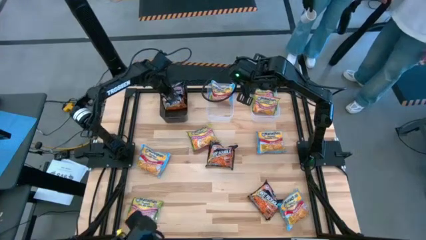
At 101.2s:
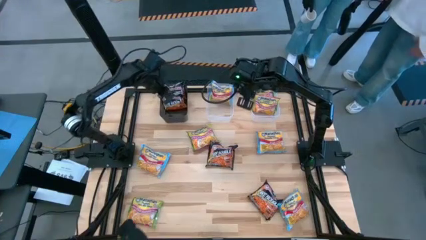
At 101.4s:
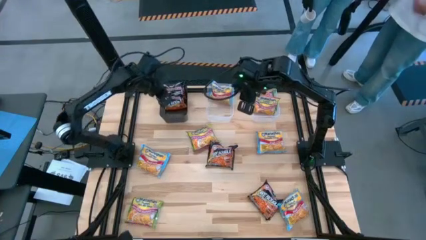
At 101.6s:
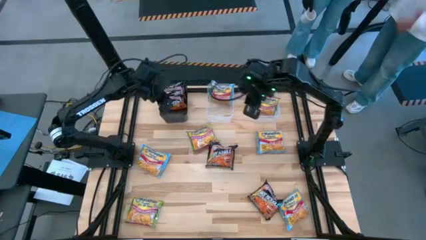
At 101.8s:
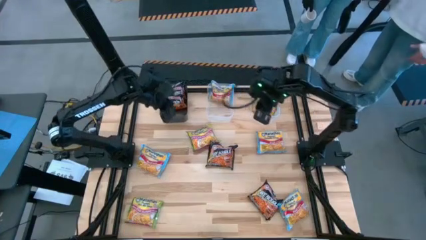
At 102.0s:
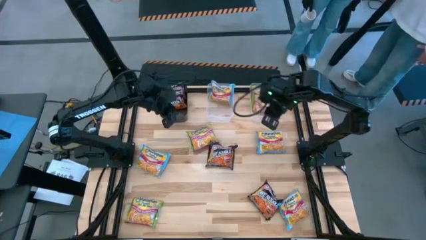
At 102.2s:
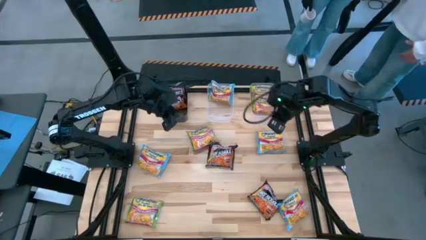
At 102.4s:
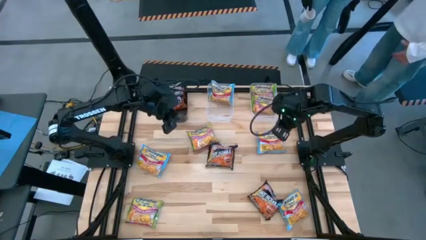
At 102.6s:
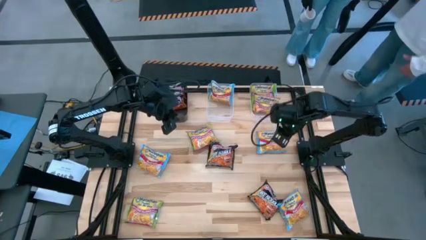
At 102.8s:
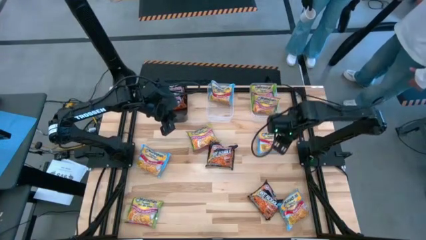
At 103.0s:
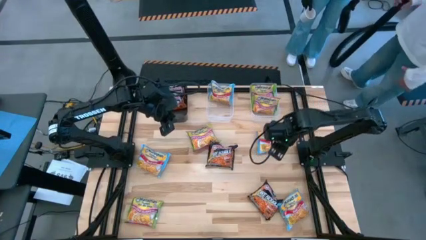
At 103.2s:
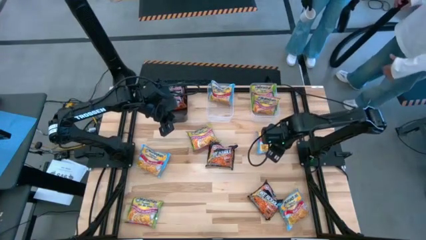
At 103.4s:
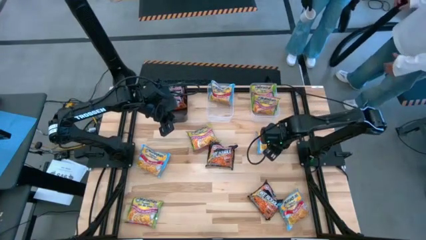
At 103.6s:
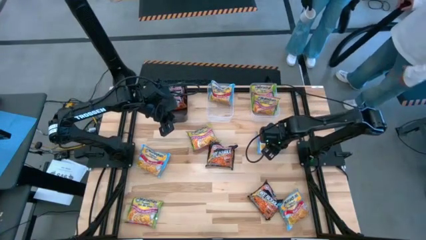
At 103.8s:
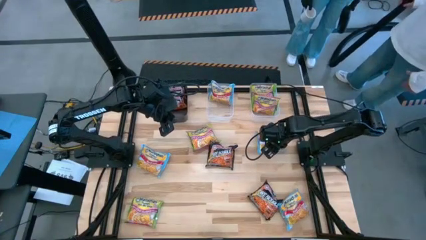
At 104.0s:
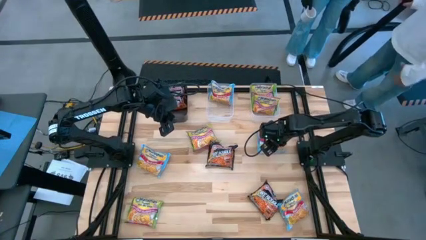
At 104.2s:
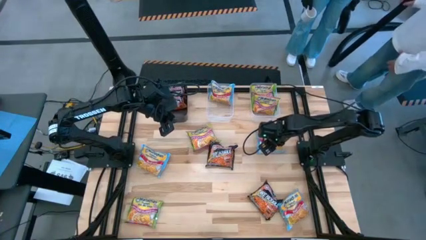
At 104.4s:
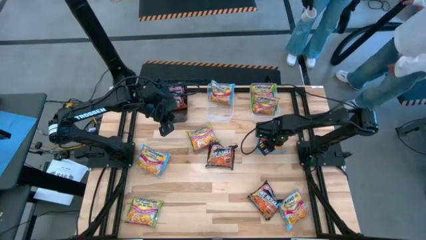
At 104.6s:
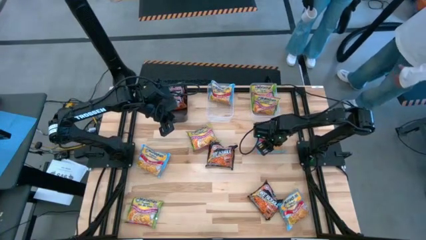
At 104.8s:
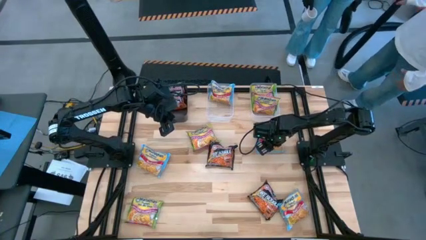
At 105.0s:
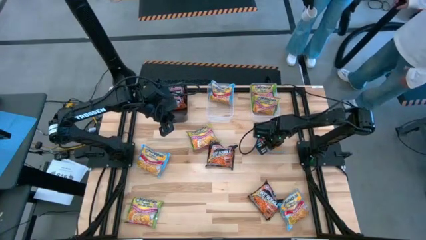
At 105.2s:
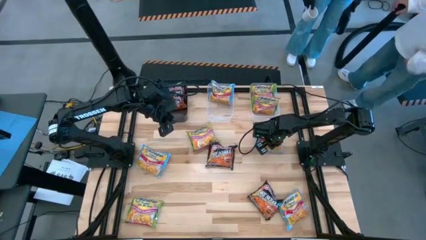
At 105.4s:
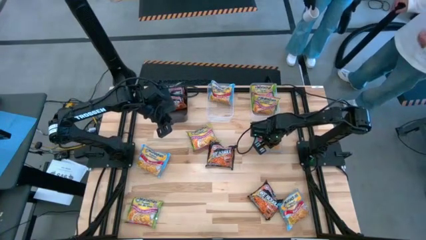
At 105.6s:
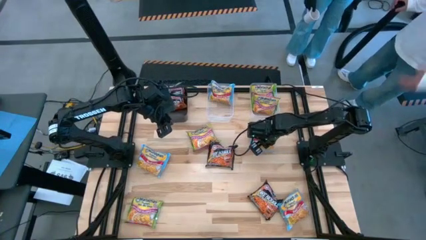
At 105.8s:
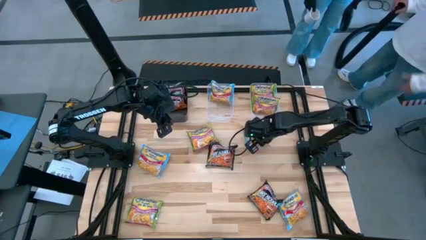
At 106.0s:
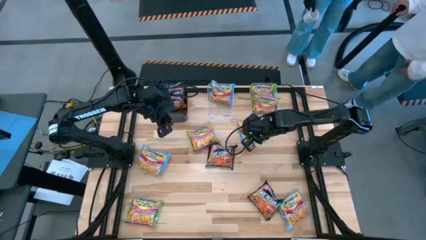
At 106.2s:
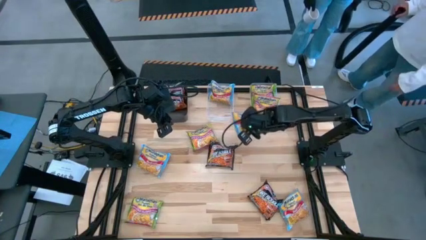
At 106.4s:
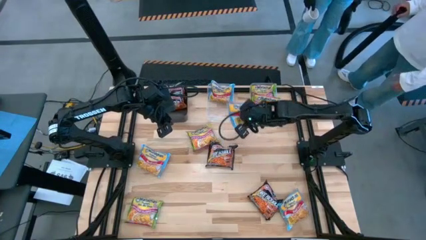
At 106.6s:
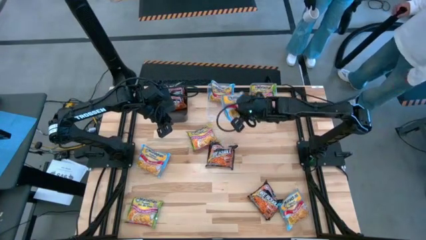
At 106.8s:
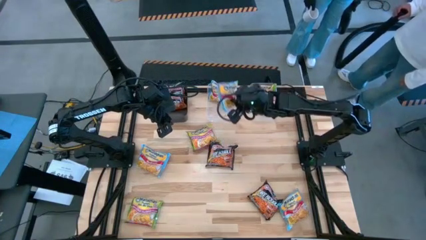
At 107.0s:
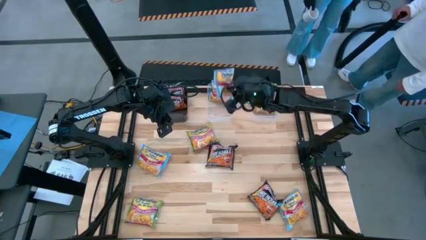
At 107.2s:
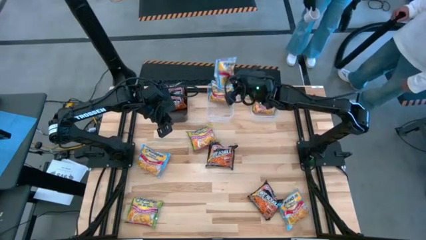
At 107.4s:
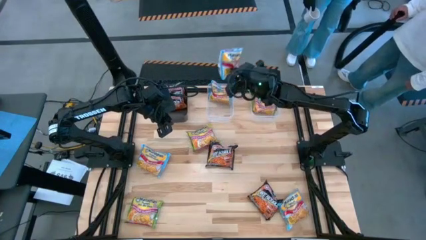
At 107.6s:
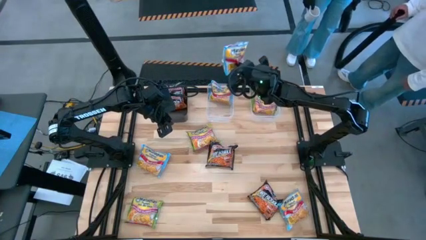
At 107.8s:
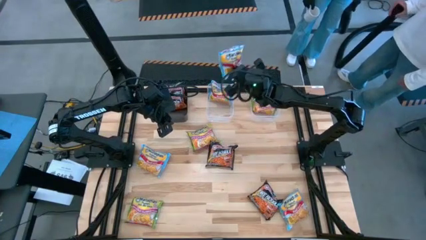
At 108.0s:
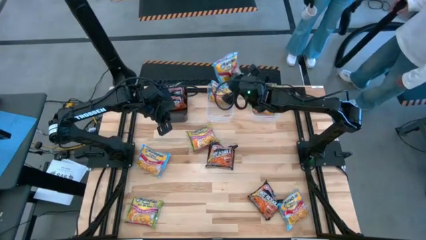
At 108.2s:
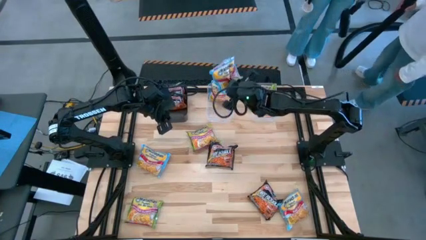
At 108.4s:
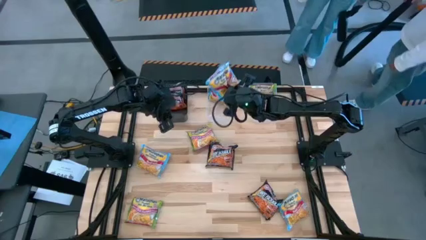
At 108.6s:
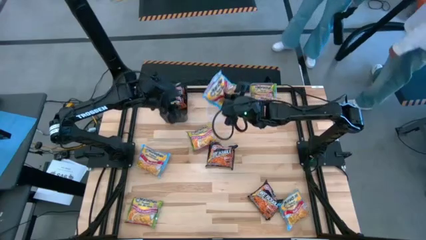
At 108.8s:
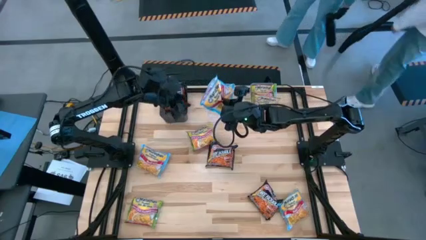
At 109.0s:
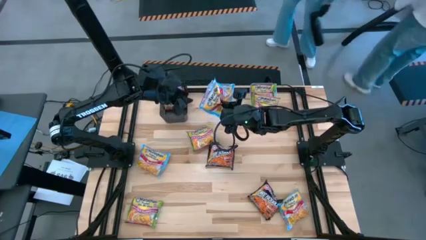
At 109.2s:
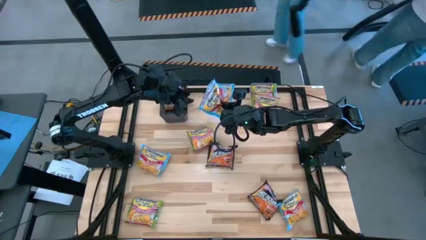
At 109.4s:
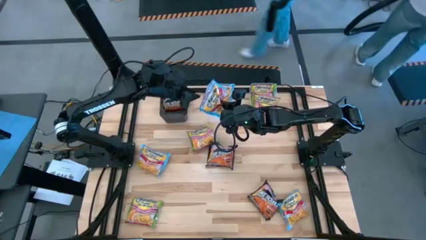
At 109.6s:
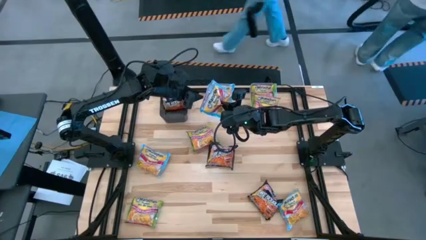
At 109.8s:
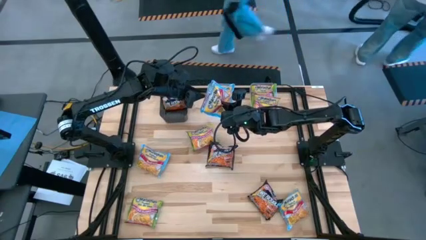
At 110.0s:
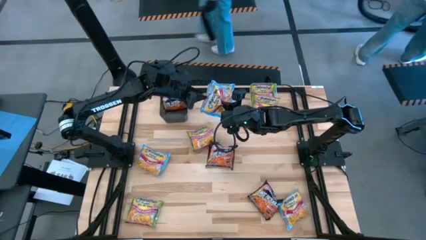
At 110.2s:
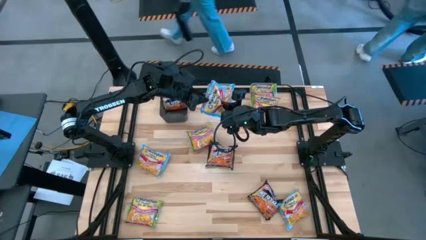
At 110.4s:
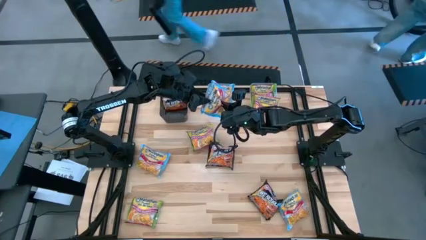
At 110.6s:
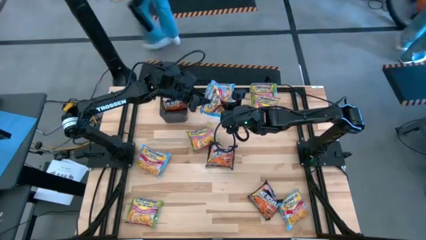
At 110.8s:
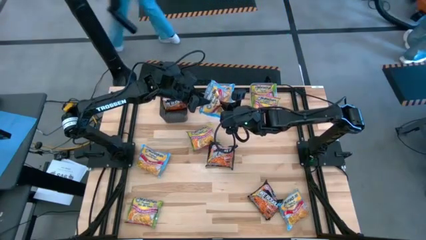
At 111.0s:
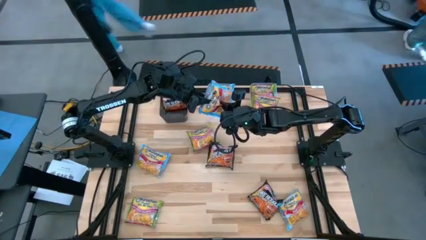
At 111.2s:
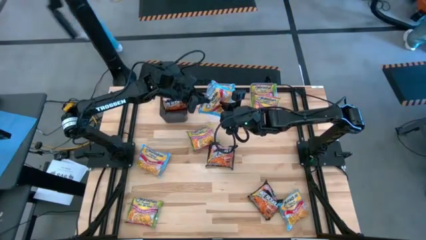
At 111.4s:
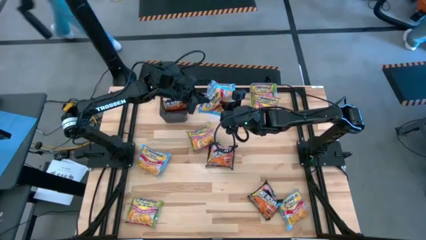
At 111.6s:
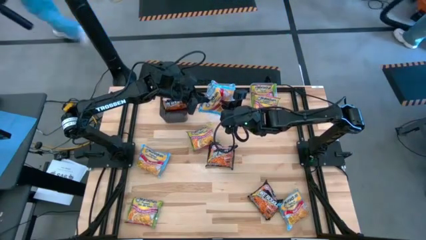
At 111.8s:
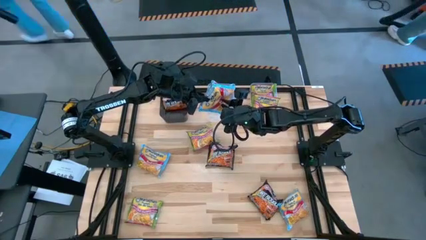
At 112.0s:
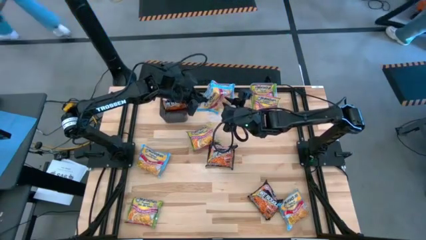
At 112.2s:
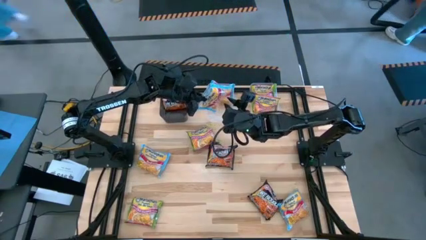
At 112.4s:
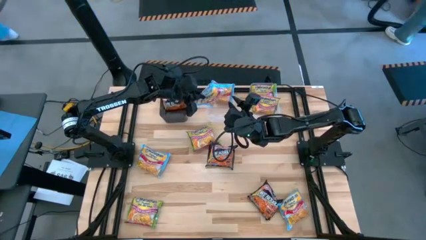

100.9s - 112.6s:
Task: Sort Maruchan noodles
Put the top right blue noodle pack into the left transparent bin

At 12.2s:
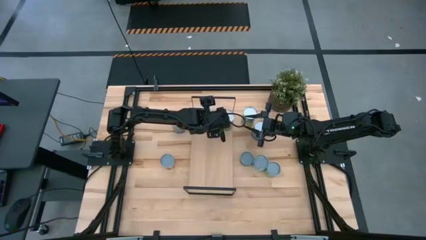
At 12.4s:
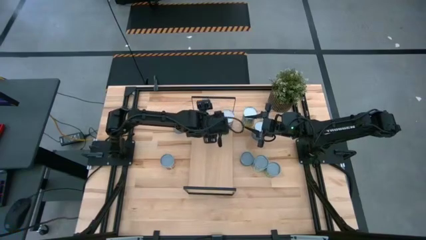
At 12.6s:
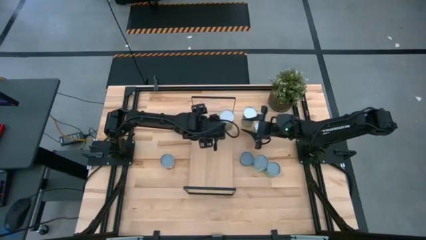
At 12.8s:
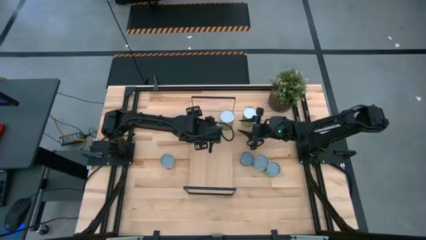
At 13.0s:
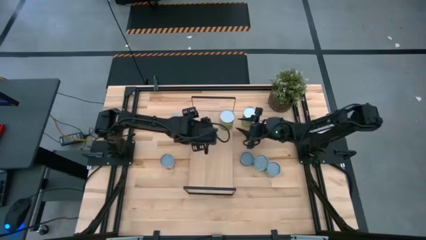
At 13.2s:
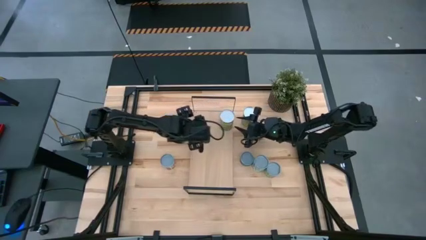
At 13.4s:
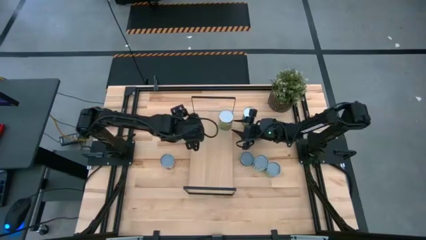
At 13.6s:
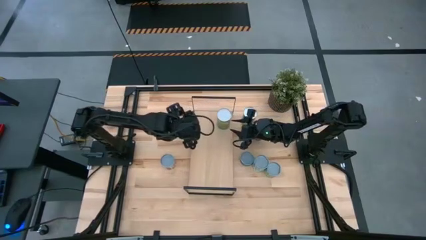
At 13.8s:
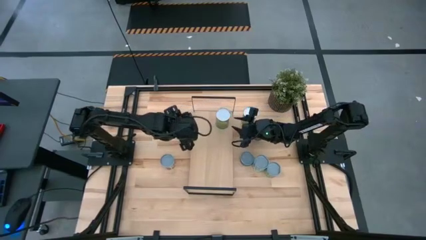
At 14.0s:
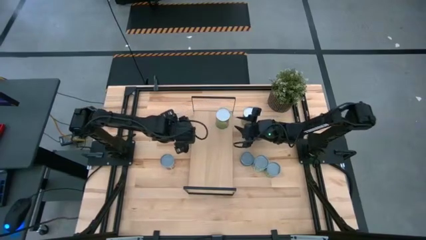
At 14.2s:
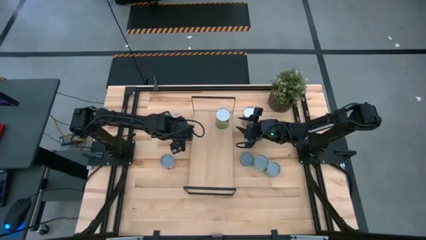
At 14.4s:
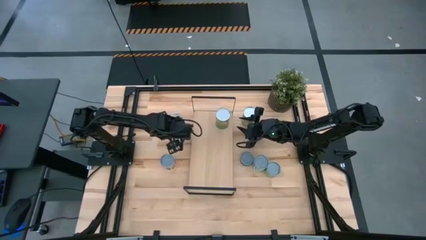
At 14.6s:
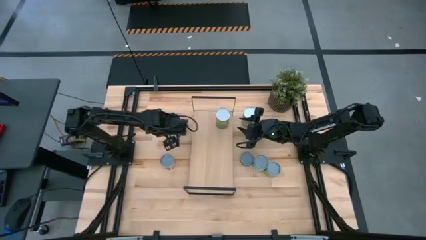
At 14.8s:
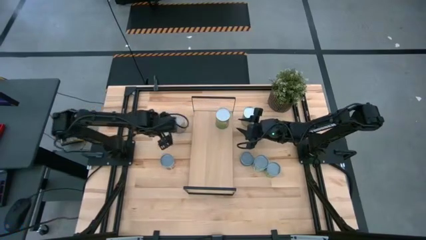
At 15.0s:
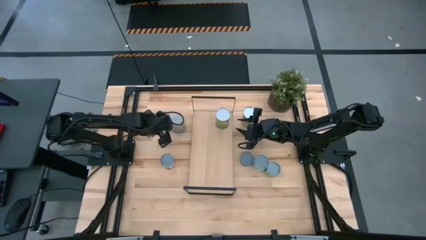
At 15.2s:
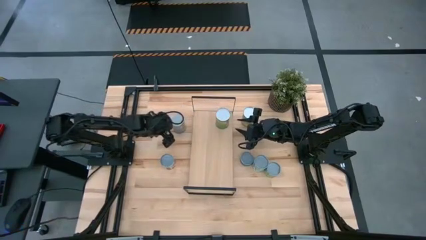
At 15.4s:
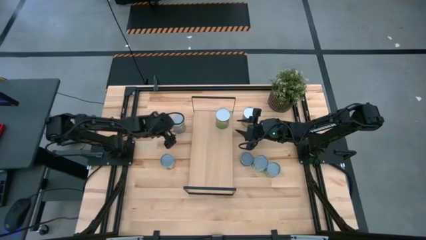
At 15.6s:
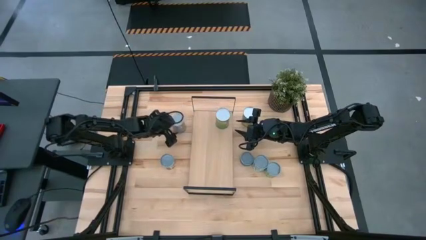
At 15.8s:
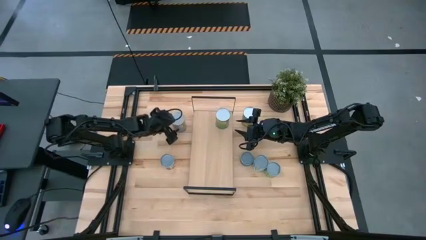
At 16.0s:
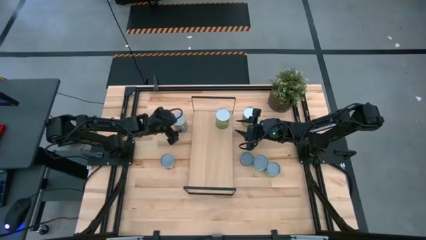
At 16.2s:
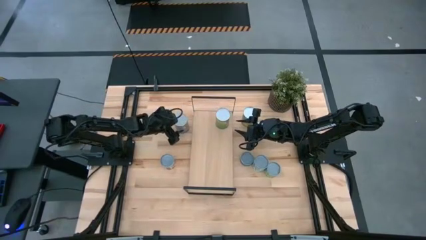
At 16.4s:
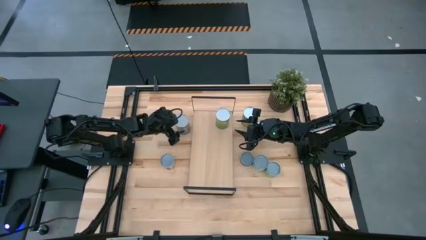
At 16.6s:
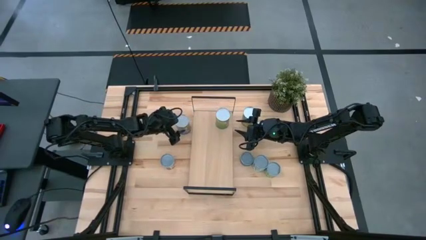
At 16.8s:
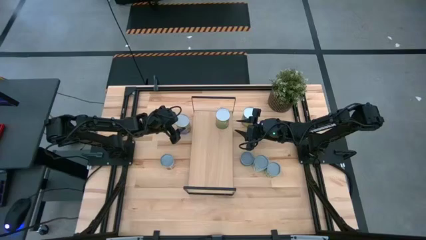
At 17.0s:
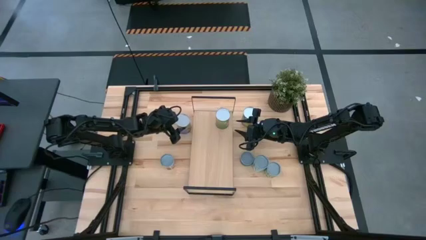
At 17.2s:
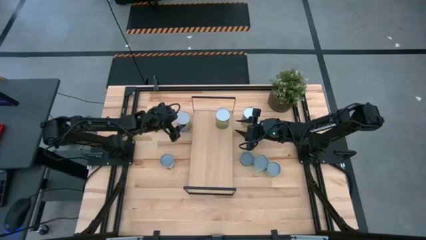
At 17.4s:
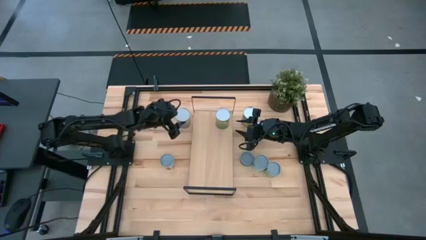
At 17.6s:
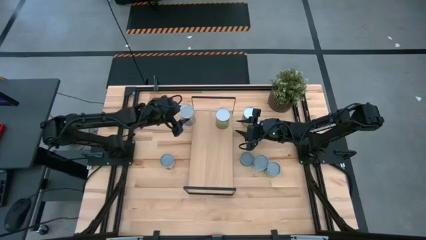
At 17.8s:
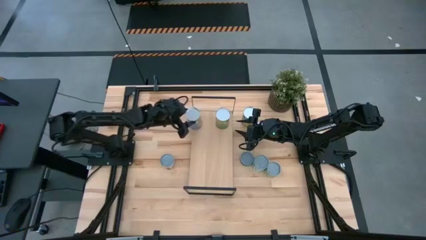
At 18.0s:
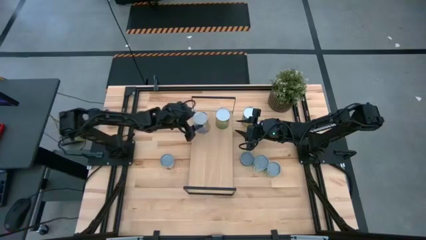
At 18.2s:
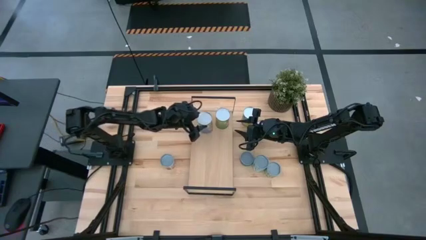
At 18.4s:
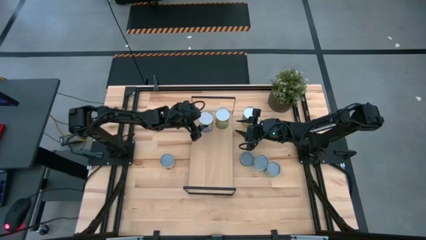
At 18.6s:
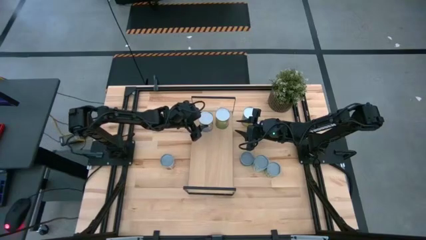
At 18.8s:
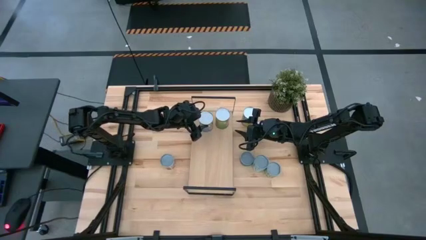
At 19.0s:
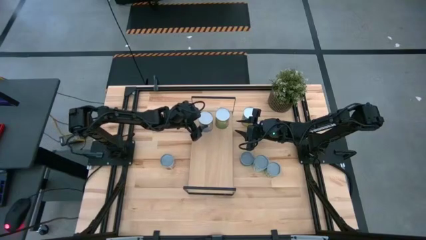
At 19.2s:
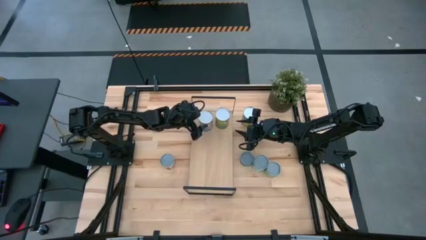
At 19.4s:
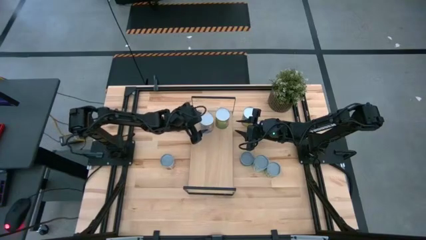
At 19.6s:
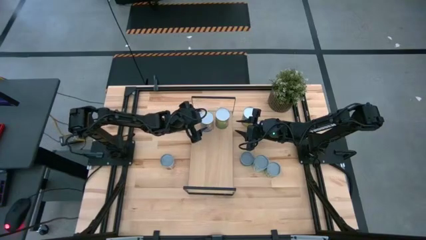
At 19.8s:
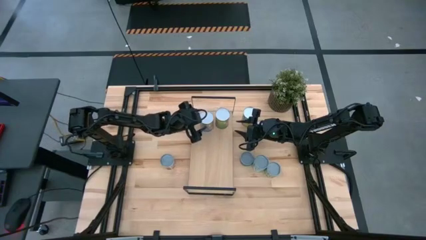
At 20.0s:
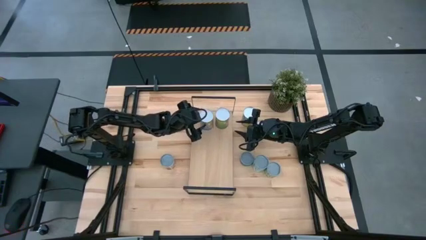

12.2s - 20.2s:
Task: Pick and place cans onto a shelf
Put the canned peaches on the shelf
